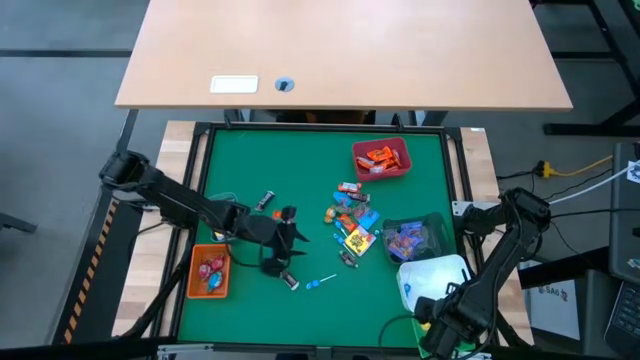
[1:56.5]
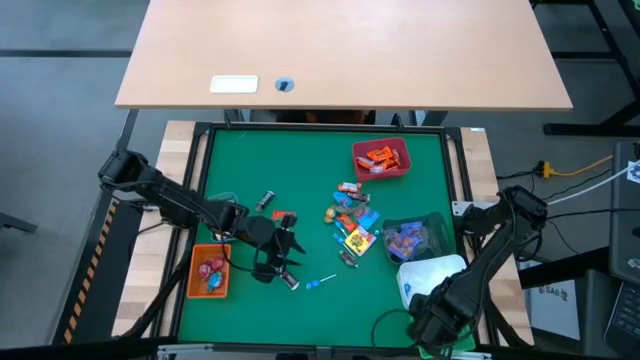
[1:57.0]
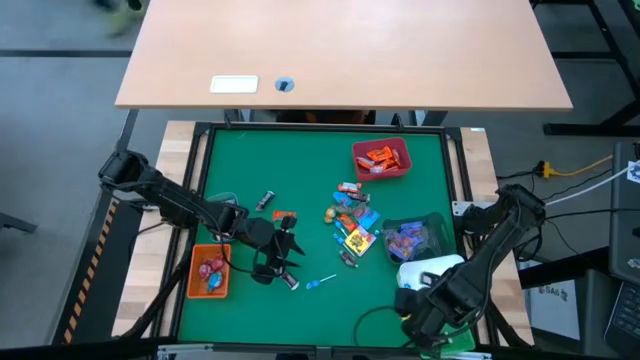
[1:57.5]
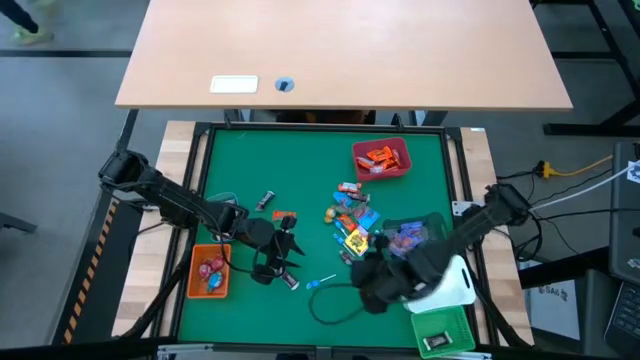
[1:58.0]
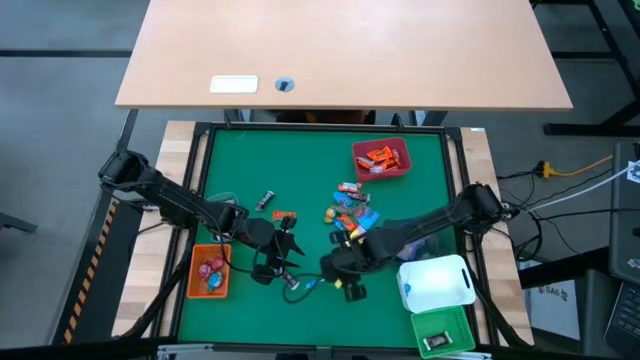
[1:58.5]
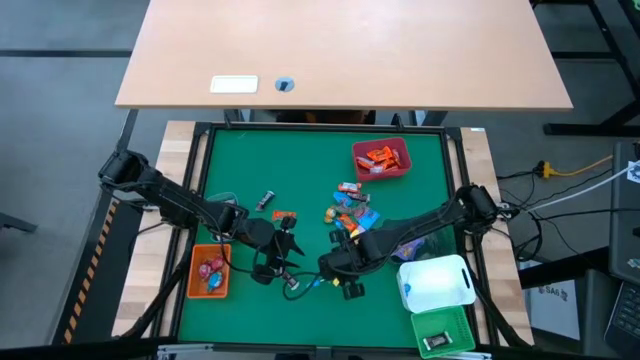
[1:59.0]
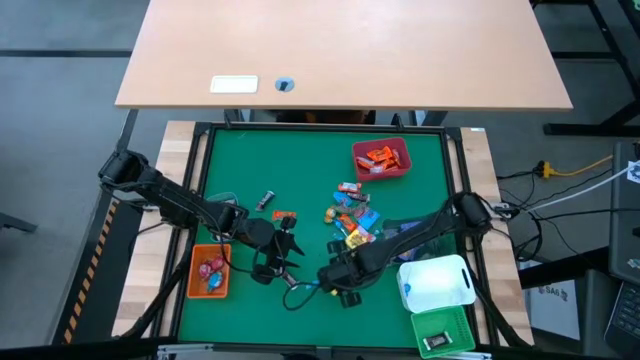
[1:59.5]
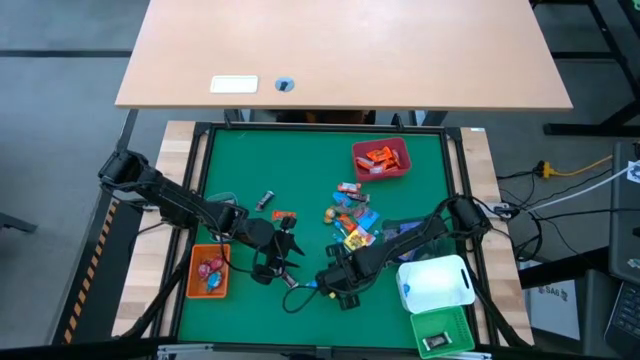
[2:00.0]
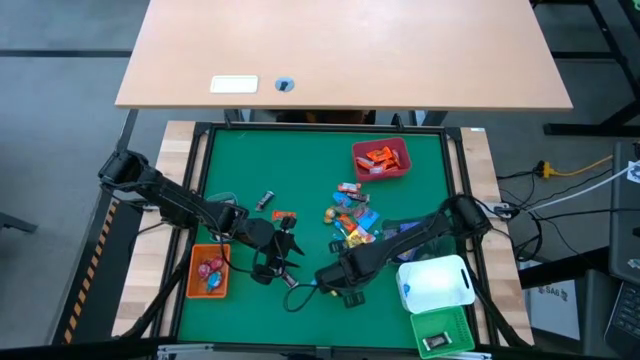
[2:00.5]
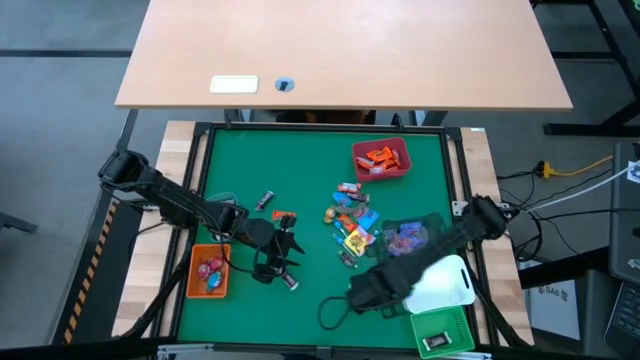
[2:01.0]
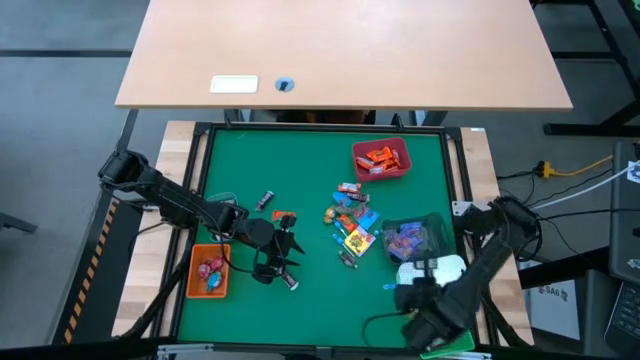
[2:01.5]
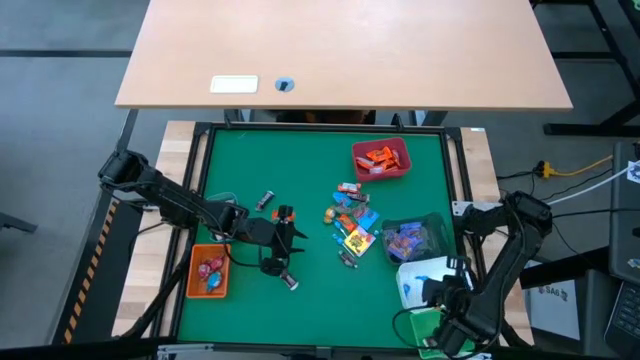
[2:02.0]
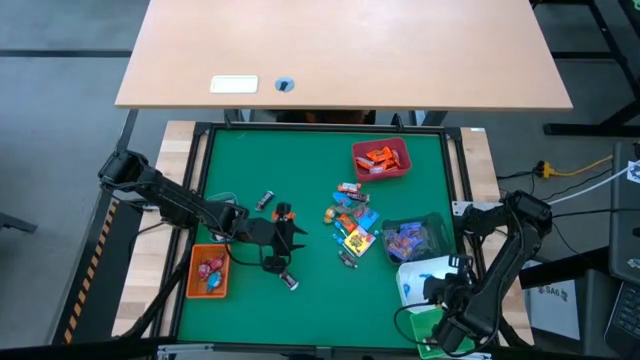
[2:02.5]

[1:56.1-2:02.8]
Task: Sort candy
Put the blue candy into the white bin

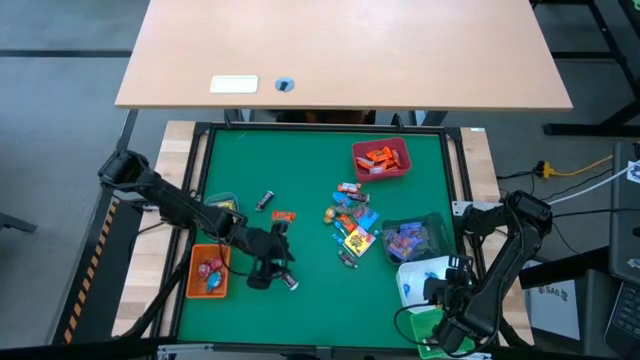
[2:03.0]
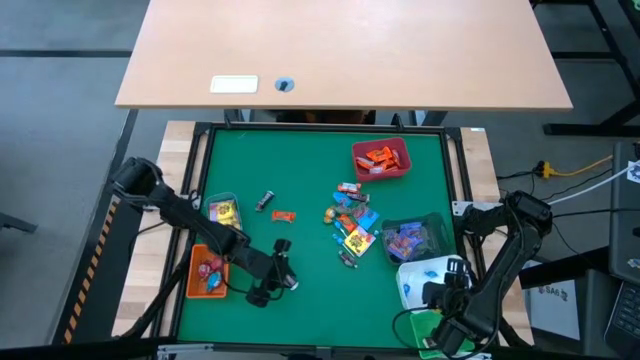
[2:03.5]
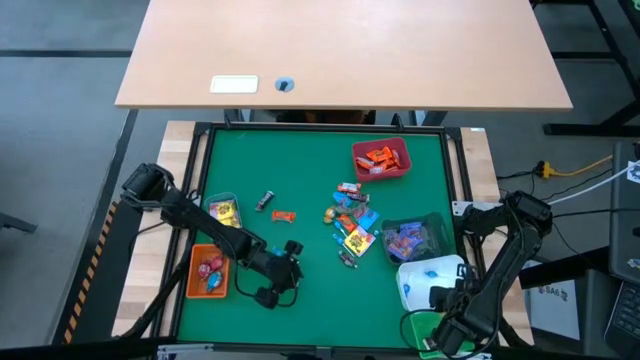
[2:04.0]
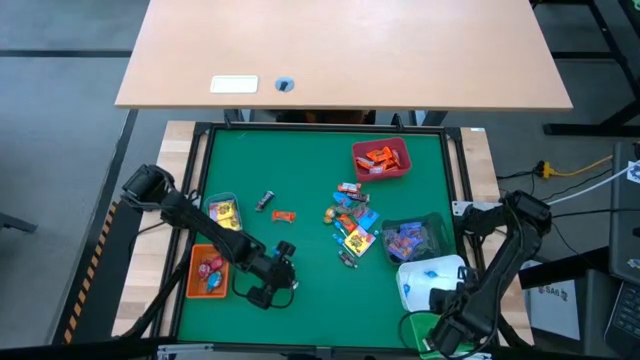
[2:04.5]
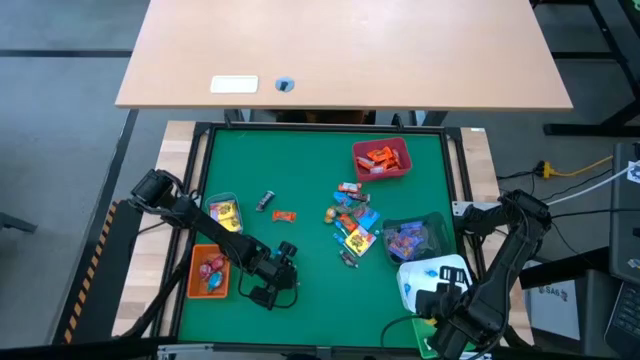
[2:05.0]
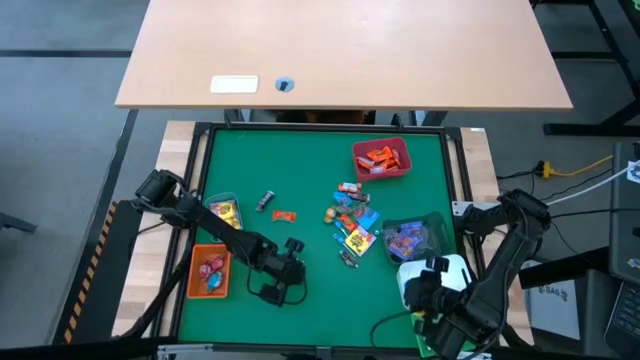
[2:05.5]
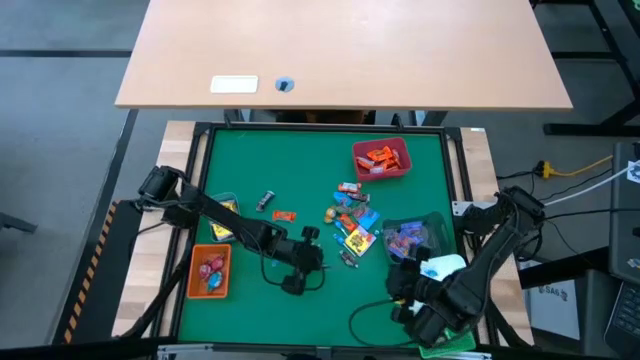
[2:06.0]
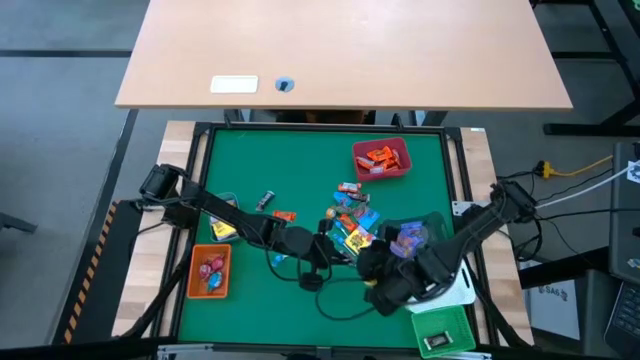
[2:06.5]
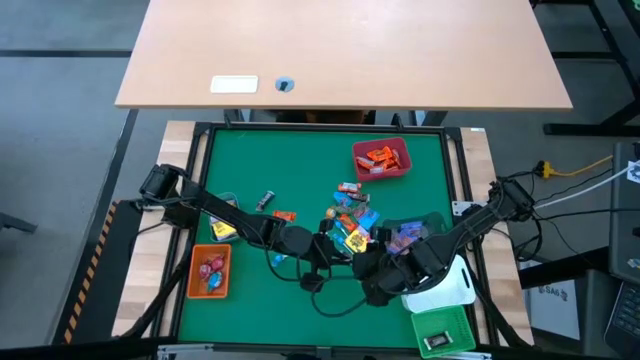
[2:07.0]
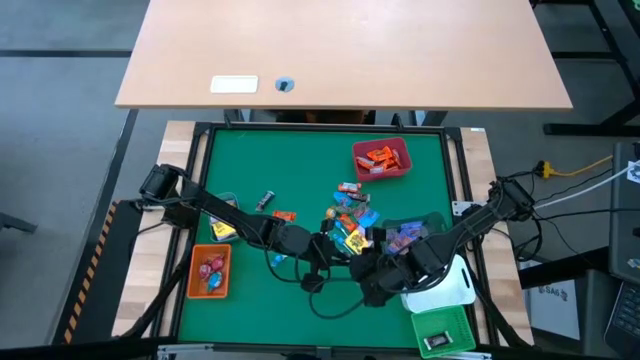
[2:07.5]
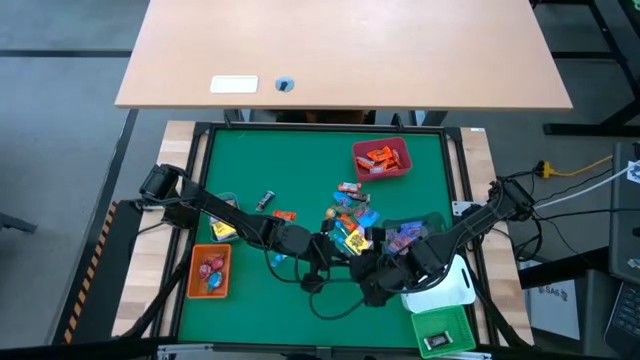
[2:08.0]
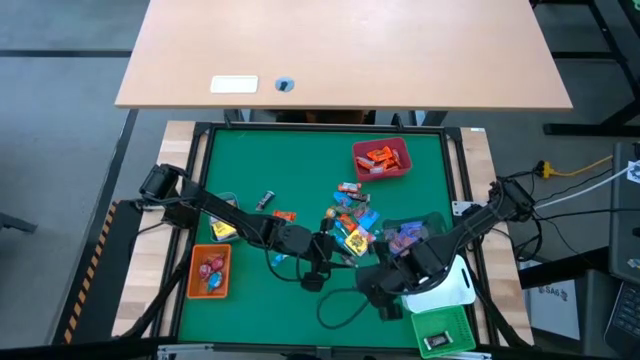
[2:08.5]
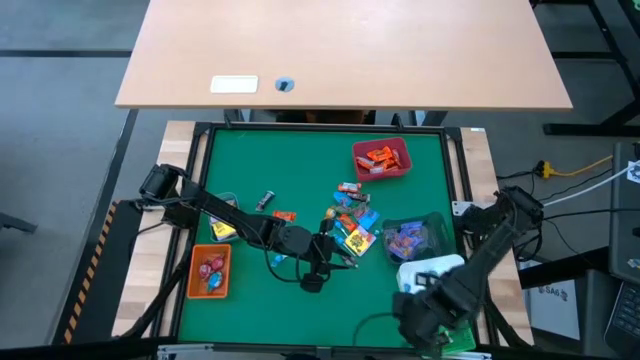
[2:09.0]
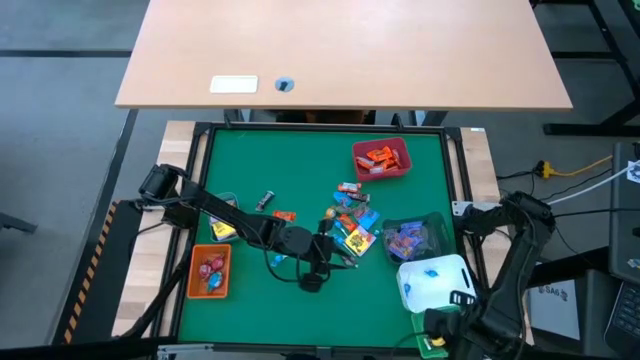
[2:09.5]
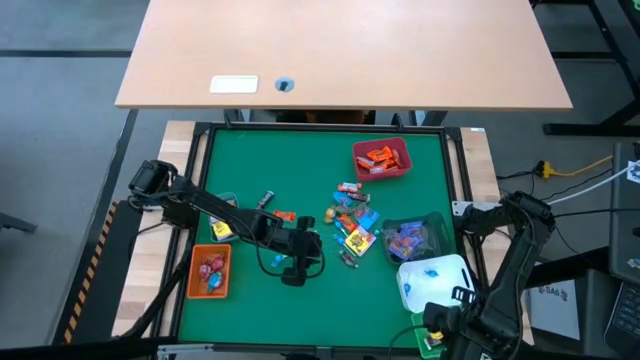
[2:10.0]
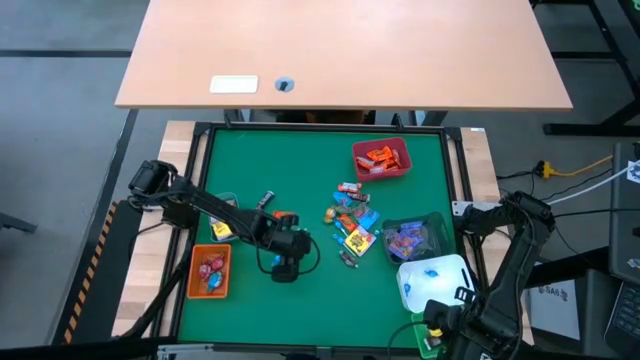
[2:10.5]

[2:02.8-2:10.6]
Put the brown chocolate bar into the green bin

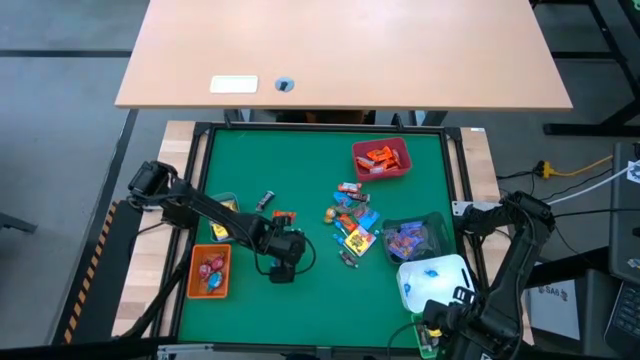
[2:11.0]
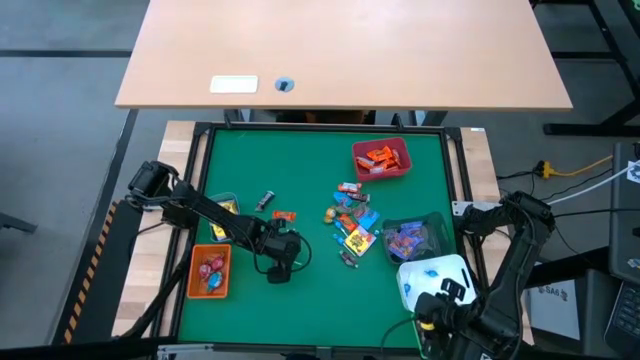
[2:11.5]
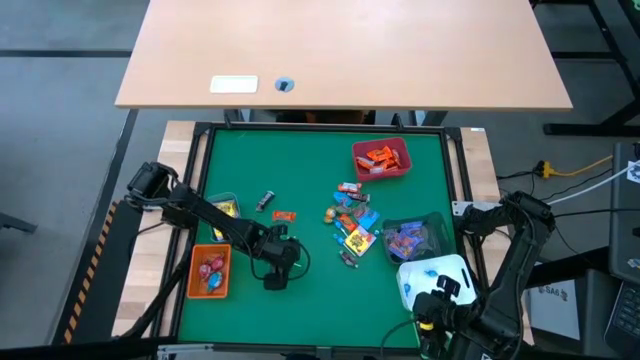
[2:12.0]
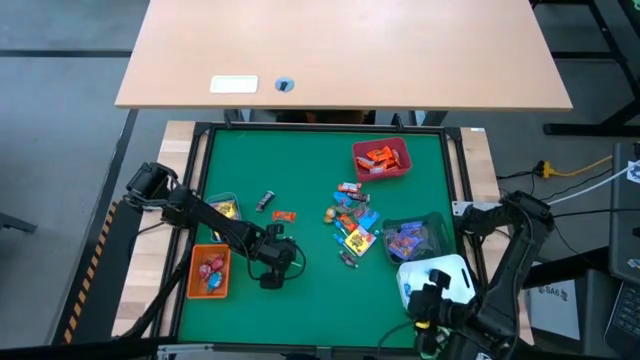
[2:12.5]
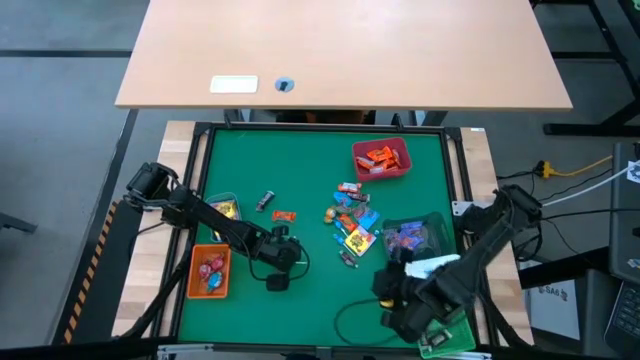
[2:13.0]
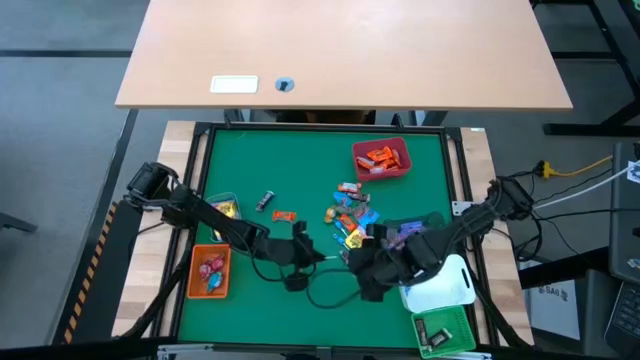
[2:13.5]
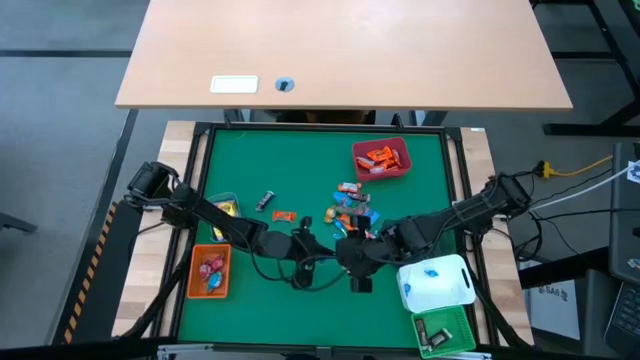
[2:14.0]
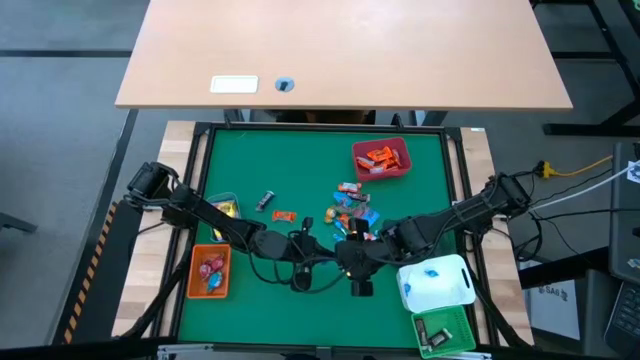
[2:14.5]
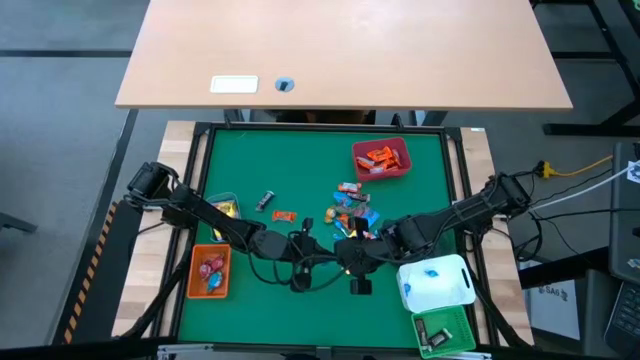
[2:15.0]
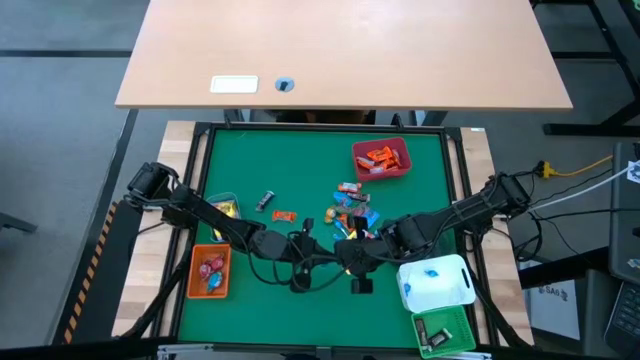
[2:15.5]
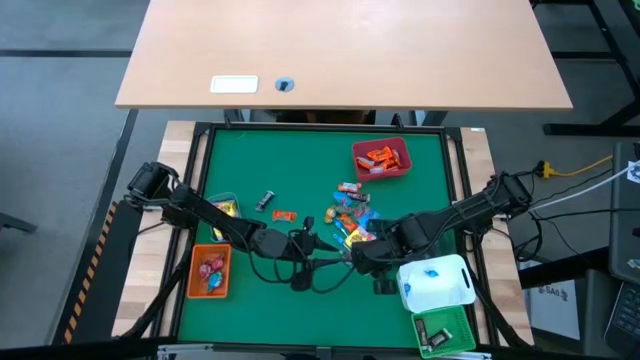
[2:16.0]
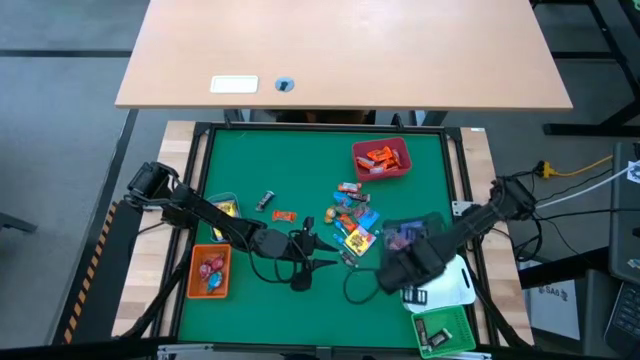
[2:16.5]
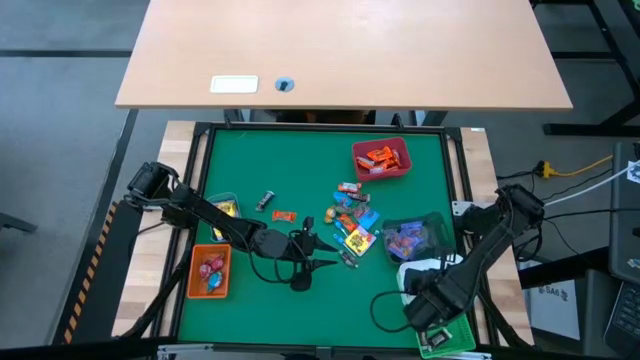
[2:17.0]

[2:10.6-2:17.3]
Put the blue candy into the white bin

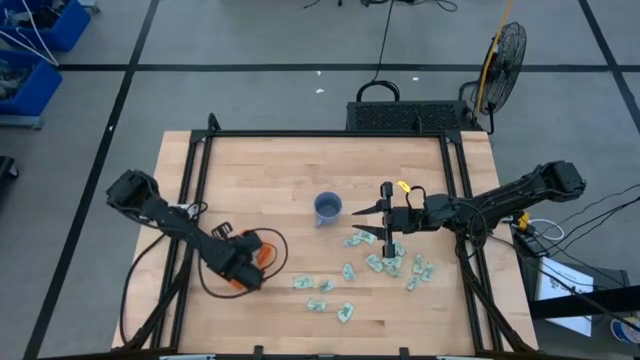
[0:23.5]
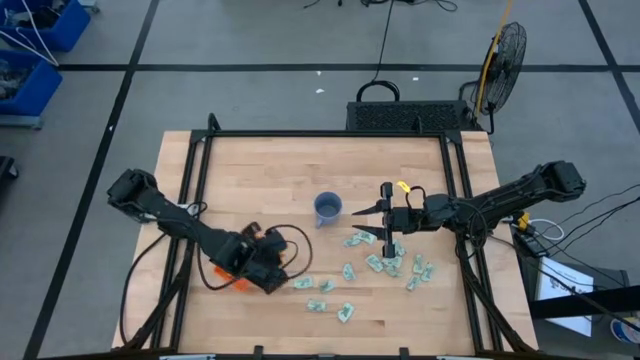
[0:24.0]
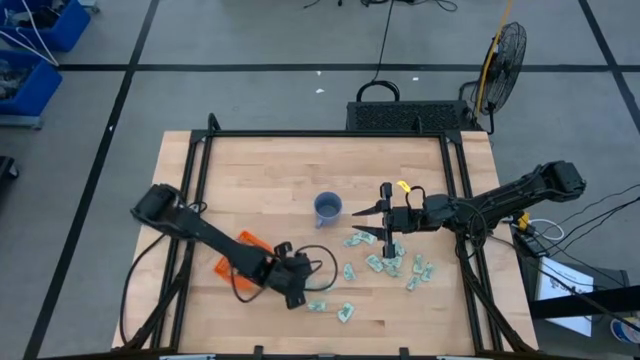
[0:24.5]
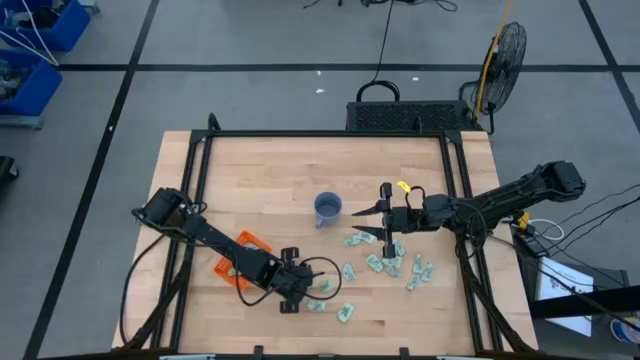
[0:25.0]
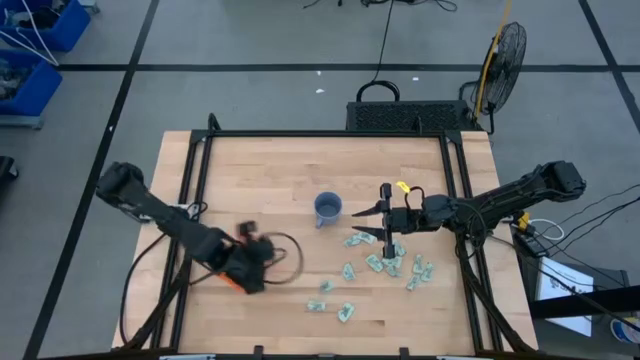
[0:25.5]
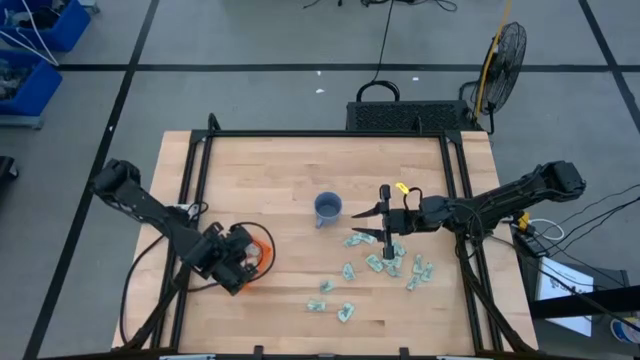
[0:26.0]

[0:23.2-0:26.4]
Task: Pick and place Stevia / Truvia into bins
Put the green stevia packet into the orange basket
